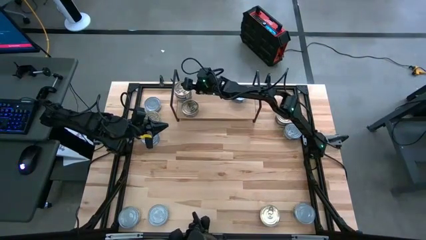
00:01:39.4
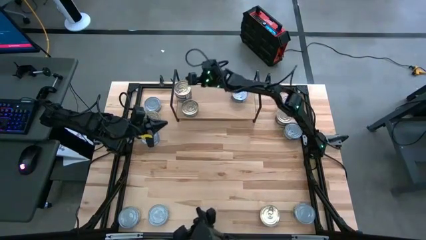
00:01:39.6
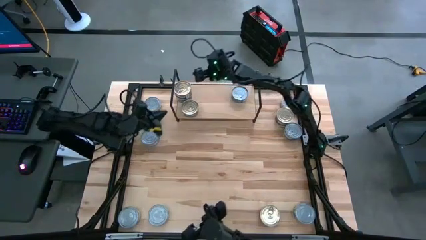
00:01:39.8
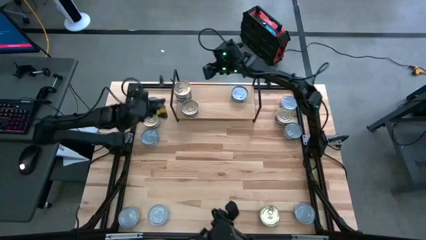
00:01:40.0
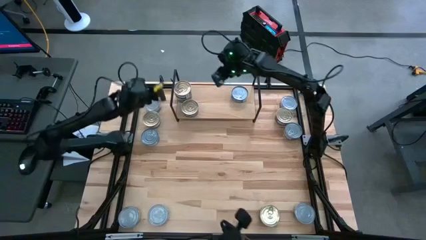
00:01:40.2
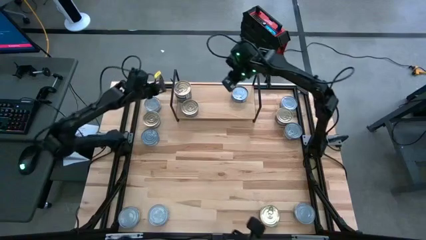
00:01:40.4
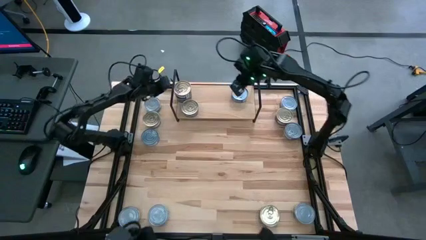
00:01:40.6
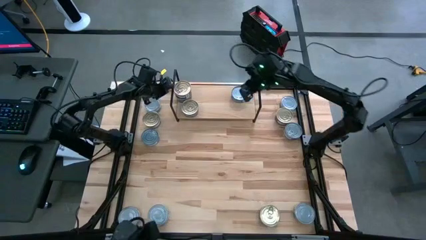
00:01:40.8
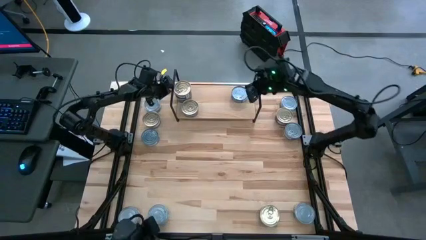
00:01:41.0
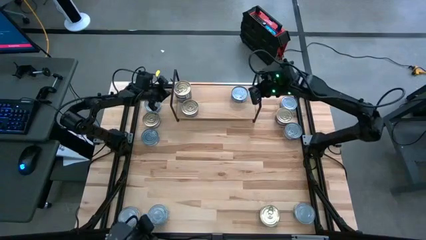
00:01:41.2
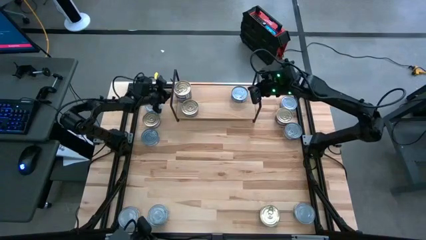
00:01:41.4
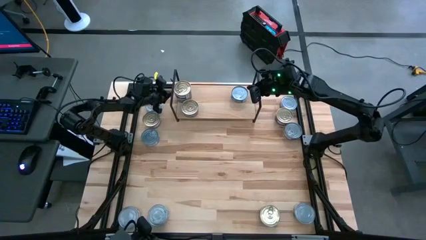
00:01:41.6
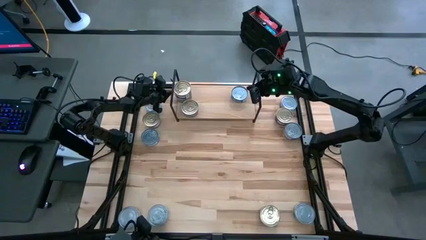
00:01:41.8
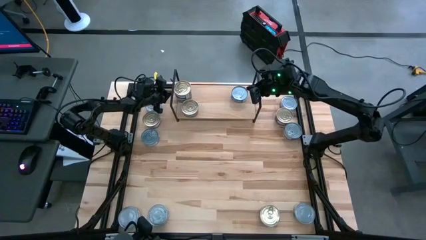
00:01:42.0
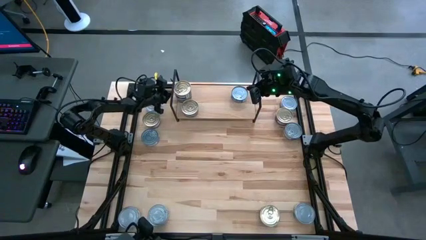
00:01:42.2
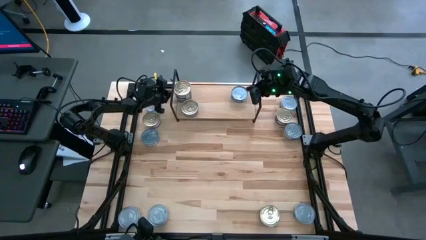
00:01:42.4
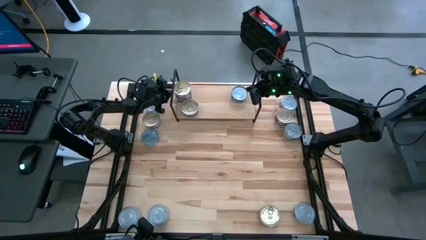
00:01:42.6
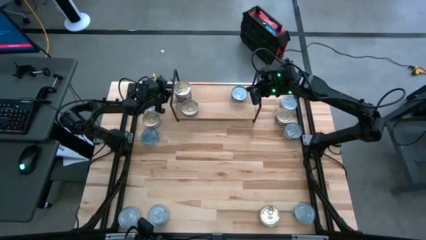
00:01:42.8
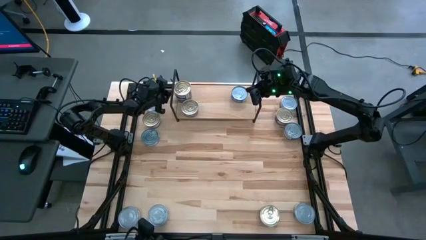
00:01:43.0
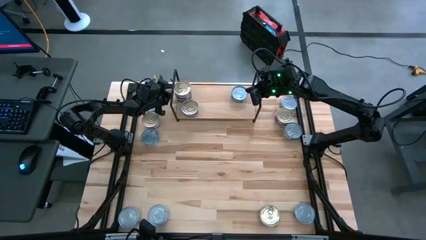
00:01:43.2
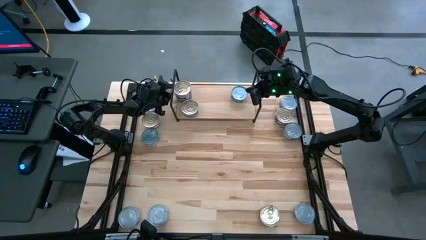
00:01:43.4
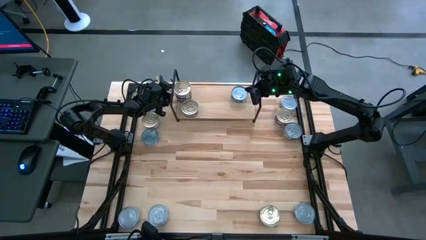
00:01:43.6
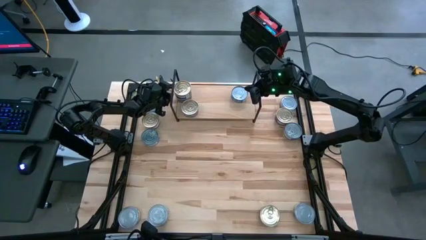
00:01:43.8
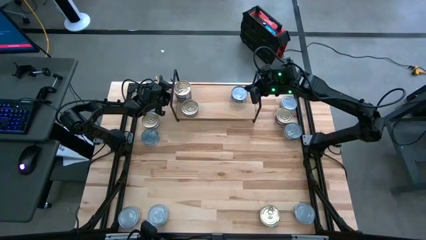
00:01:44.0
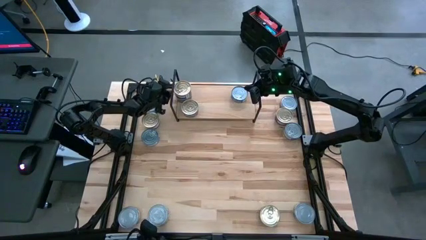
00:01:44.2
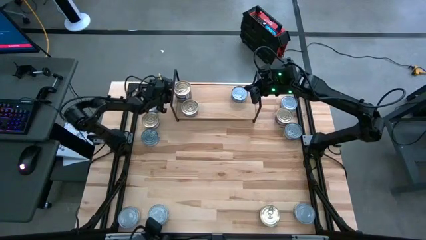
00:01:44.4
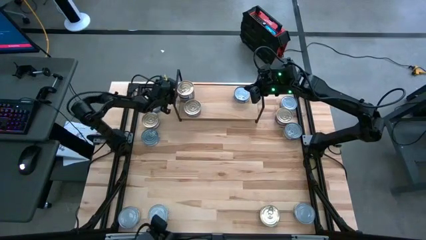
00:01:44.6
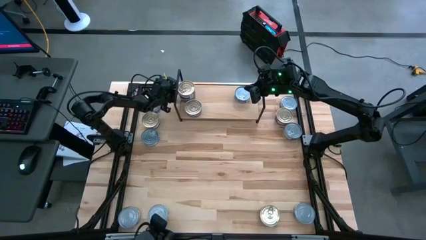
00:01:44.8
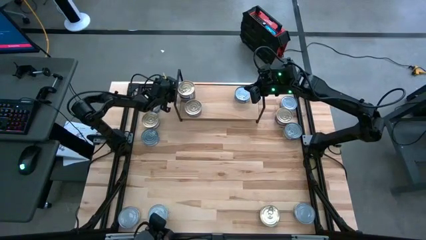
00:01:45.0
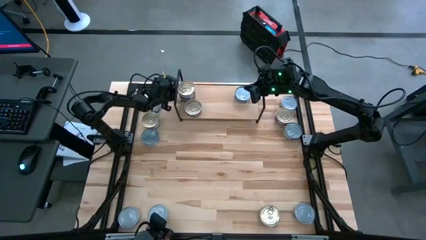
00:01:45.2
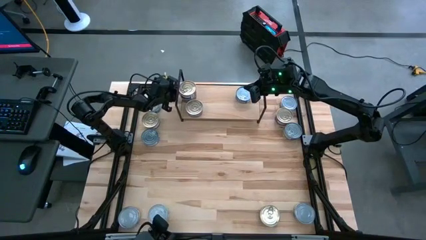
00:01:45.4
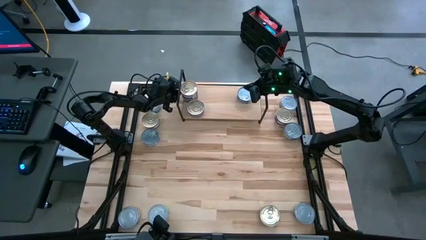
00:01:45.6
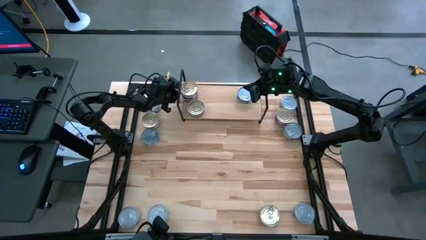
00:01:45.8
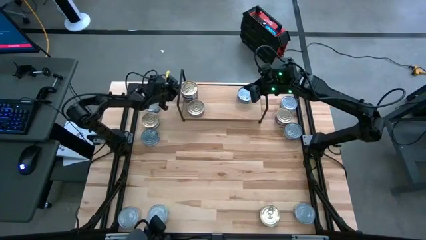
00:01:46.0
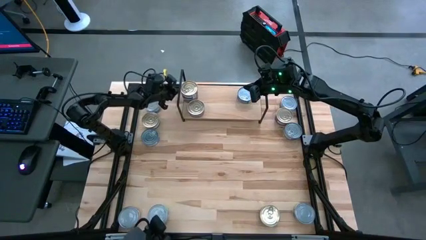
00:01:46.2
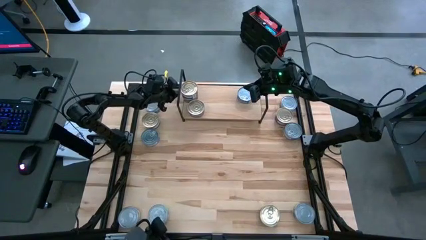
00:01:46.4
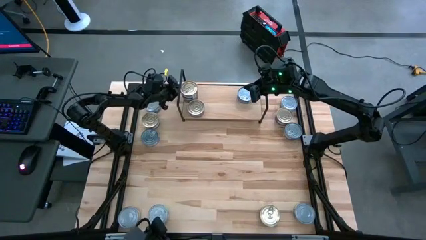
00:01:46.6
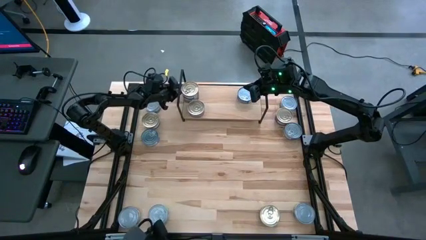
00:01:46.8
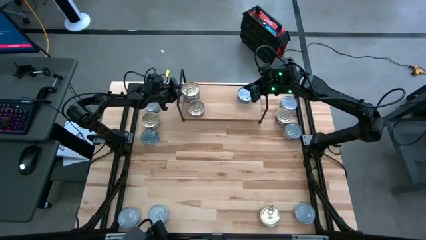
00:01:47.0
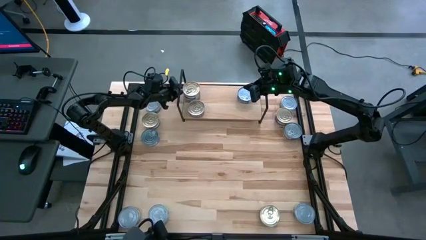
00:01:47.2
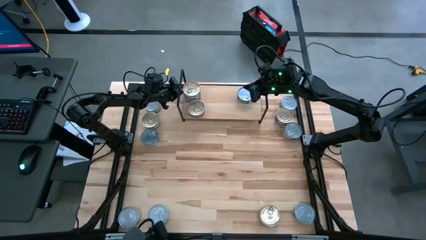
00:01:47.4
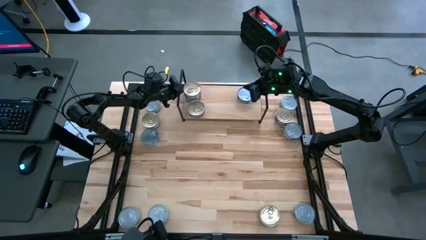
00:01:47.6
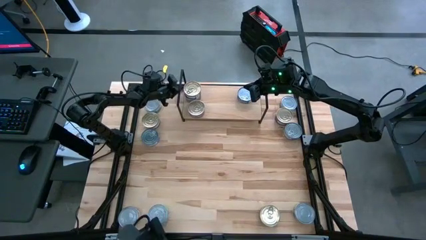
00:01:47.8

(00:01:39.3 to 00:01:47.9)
Task: Stack canned seafood by type on shelf
Adjust the stacked blue pink tuna cans on the shelf

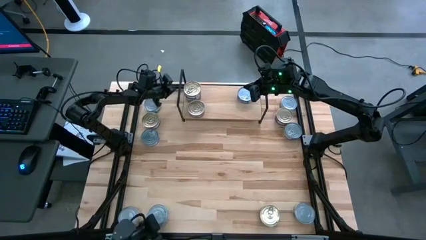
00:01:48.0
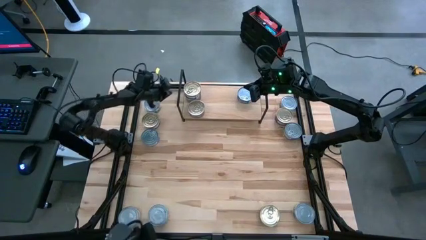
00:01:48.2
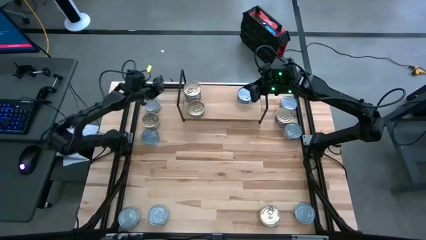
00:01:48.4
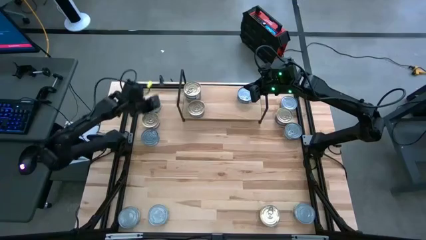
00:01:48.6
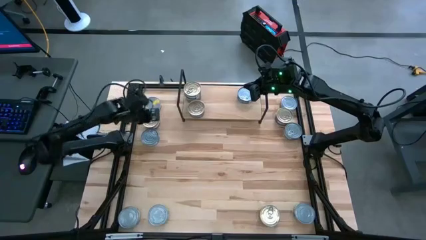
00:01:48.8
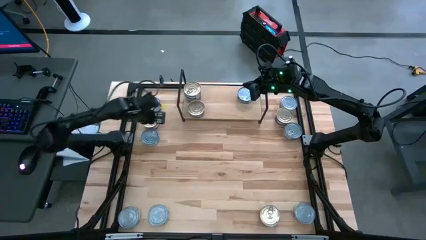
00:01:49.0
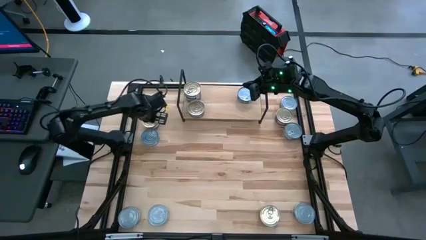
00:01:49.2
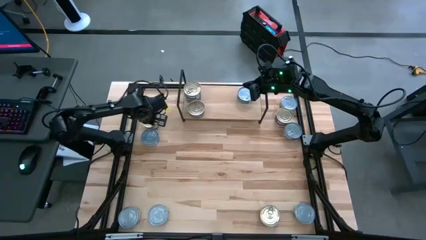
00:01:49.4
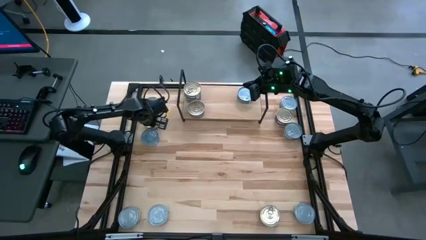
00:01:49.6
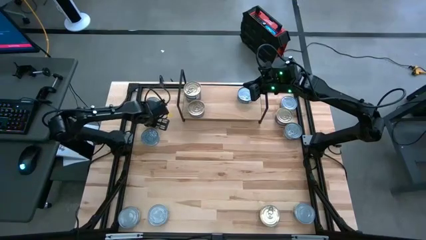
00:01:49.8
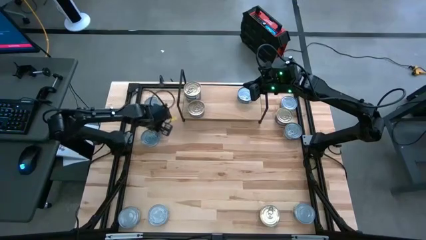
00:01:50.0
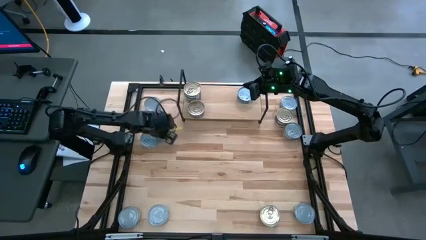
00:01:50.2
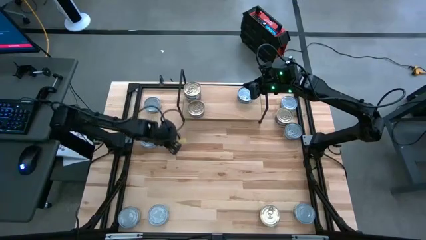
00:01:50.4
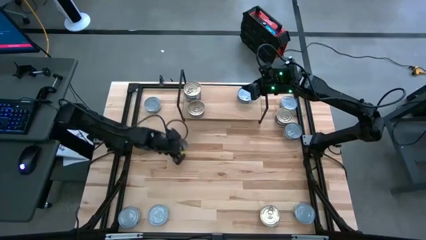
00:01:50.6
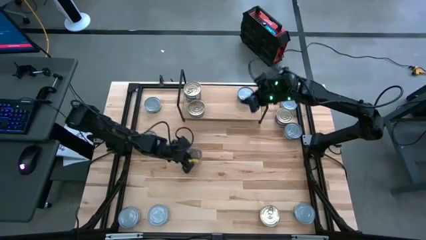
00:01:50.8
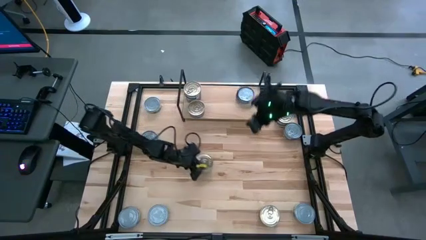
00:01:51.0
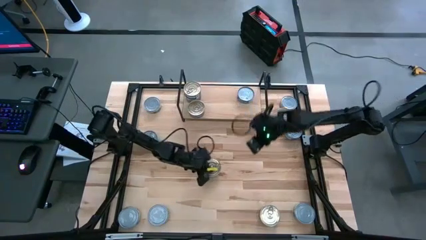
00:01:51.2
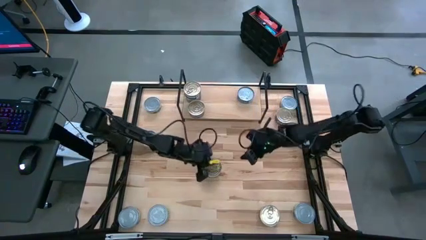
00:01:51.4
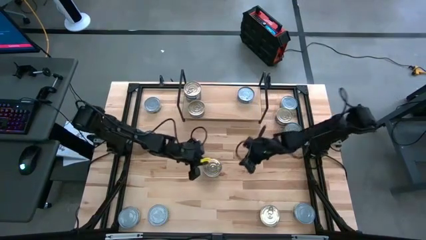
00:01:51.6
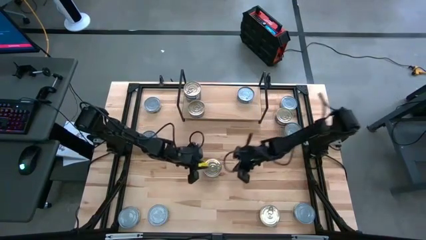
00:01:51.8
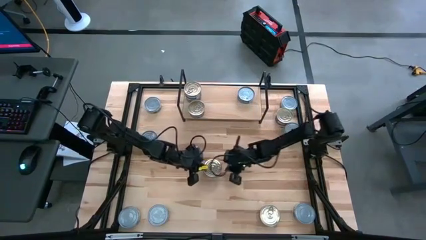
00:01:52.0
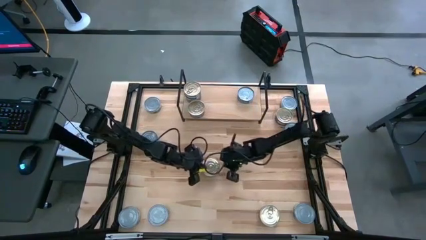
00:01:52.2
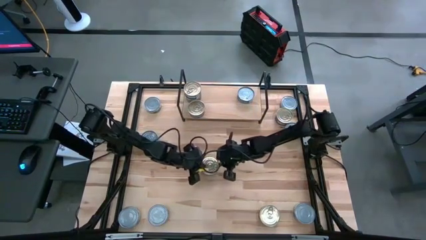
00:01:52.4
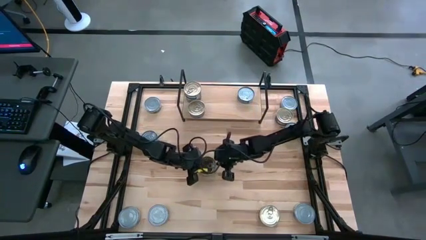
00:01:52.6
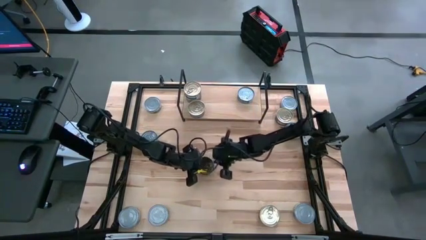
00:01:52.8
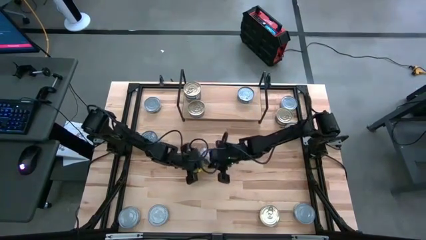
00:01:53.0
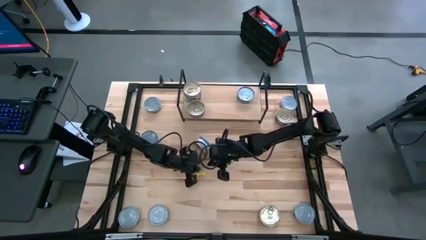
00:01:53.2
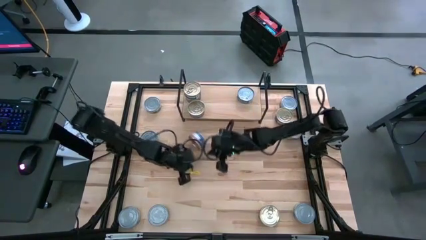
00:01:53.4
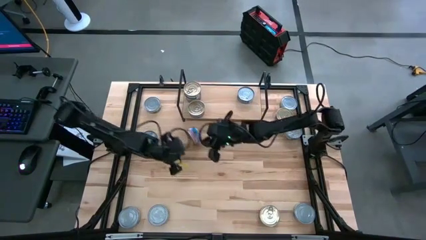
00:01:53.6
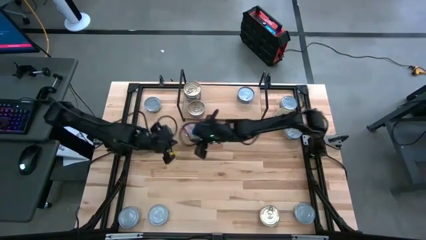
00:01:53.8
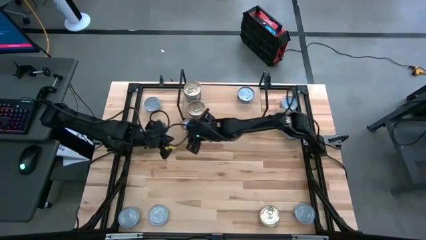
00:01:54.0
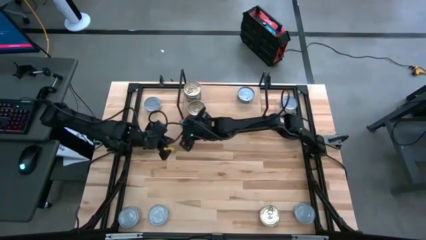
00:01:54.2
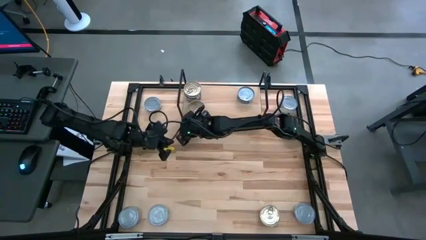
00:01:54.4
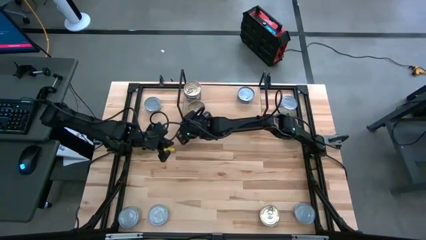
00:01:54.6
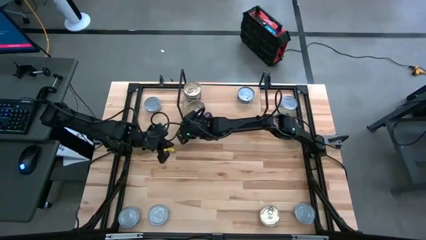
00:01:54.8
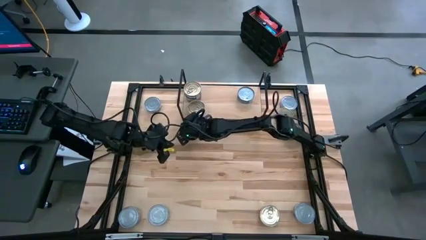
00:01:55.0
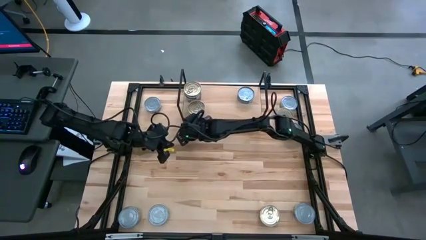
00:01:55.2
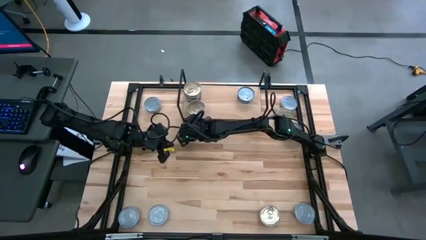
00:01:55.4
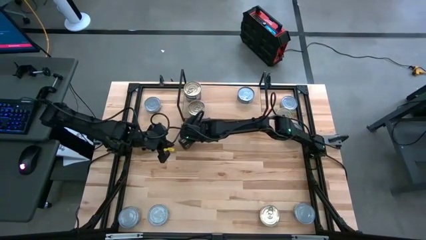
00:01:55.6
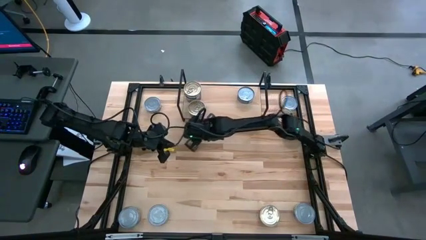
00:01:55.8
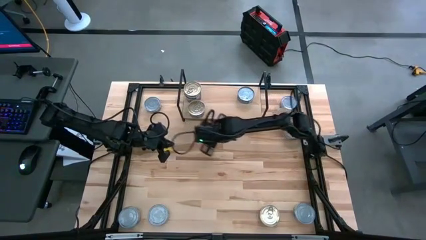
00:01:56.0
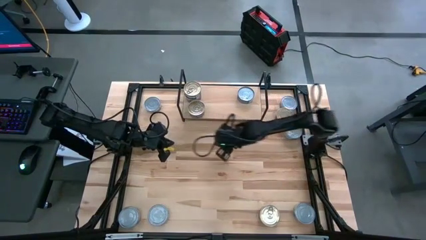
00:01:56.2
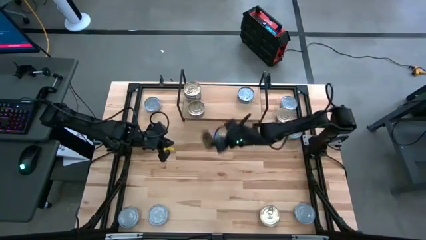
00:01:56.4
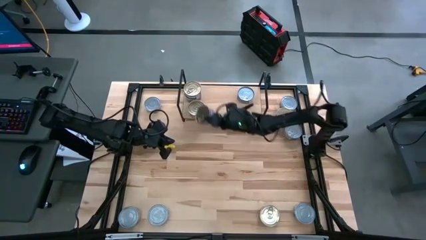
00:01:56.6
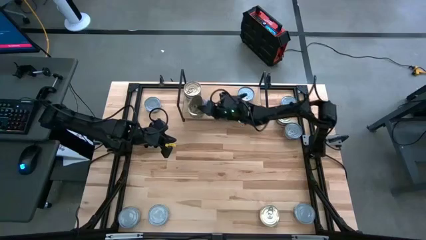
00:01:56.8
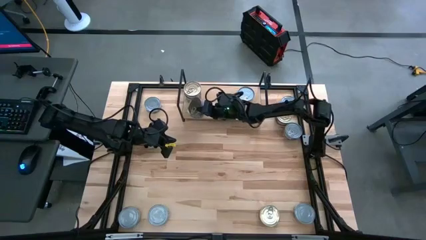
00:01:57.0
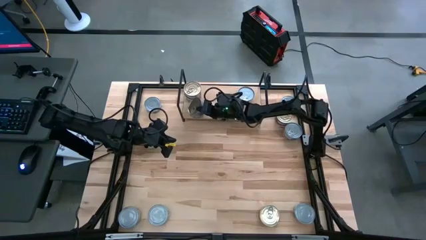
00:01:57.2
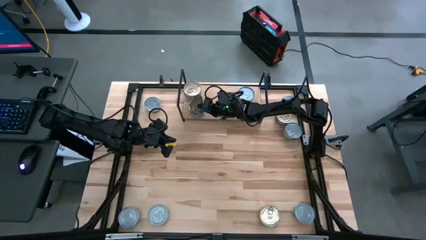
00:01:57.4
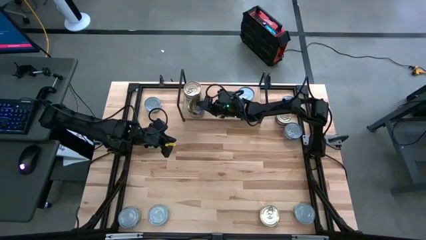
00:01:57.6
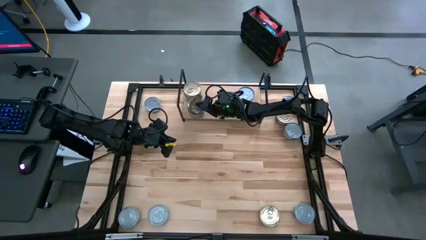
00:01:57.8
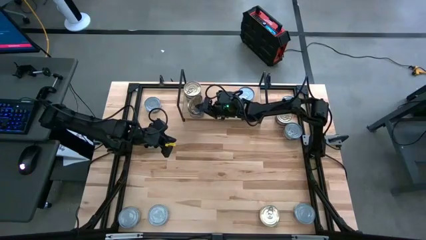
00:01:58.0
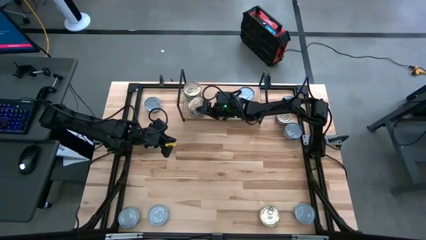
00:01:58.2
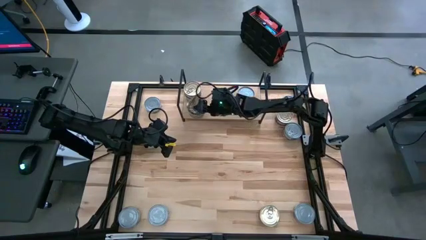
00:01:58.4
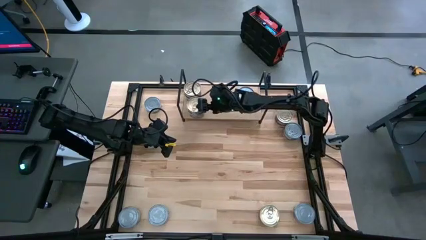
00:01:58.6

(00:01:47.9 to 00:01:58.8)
Stack the blue pink tuna can on top of the other blue pink tuna can on the shelf
